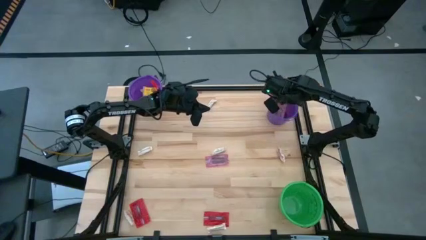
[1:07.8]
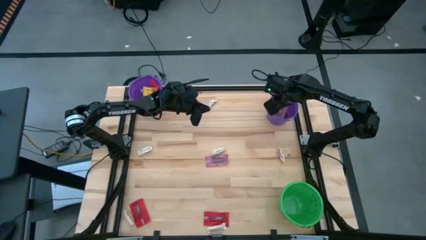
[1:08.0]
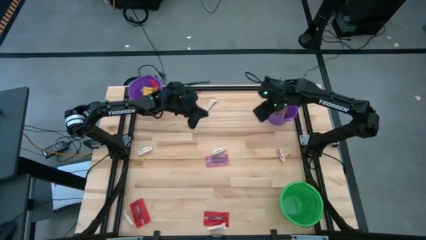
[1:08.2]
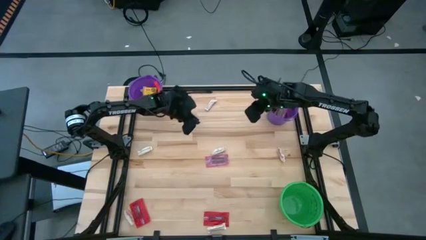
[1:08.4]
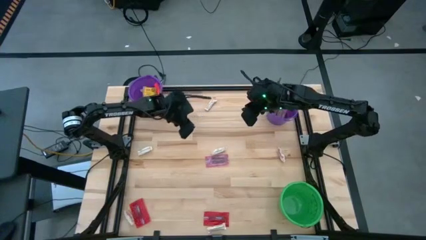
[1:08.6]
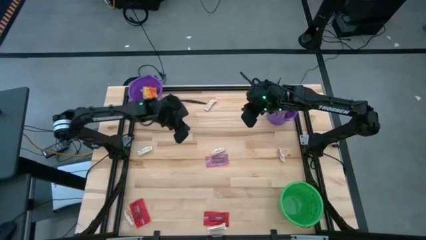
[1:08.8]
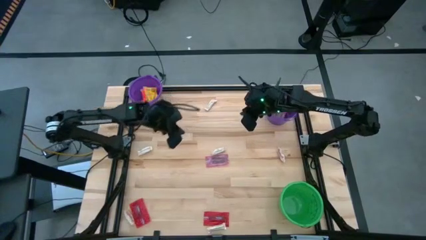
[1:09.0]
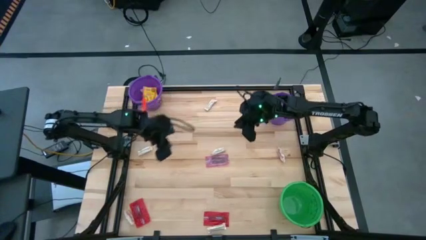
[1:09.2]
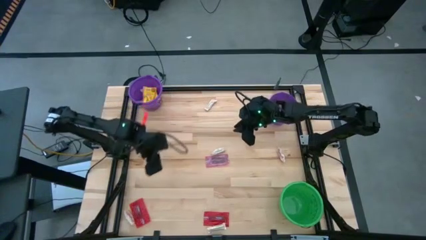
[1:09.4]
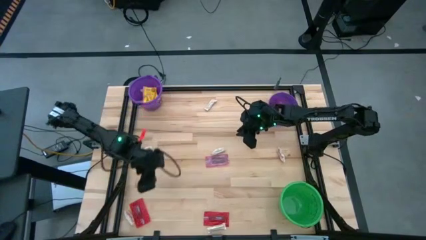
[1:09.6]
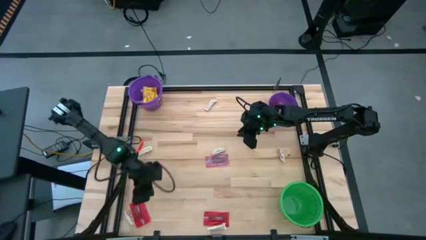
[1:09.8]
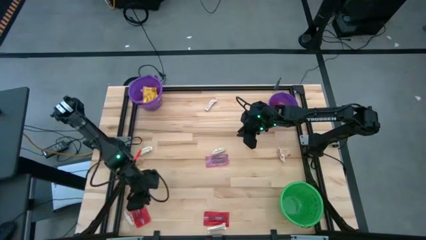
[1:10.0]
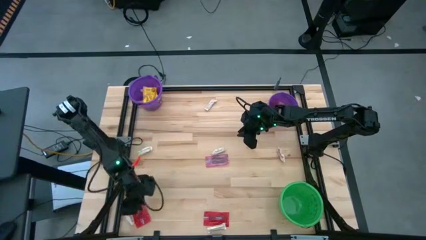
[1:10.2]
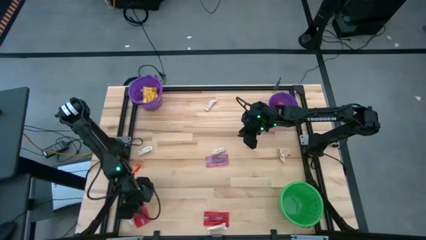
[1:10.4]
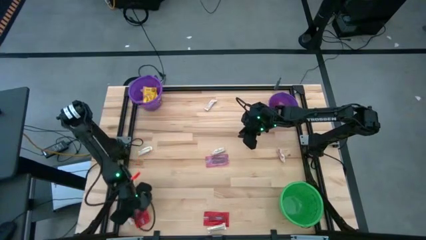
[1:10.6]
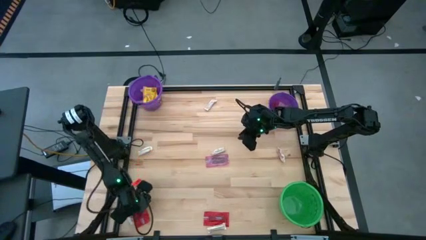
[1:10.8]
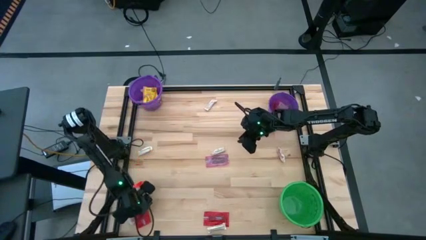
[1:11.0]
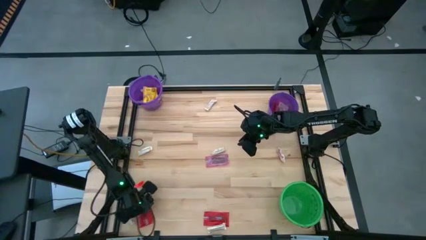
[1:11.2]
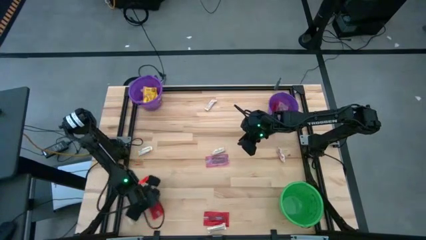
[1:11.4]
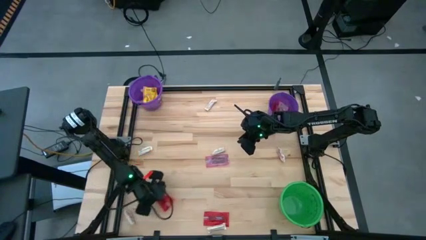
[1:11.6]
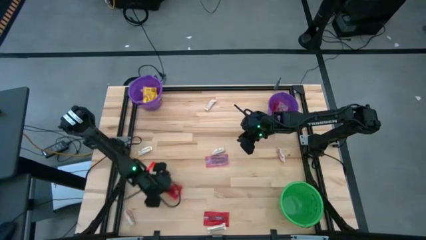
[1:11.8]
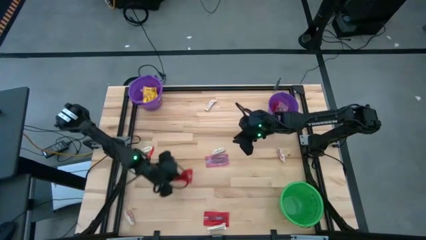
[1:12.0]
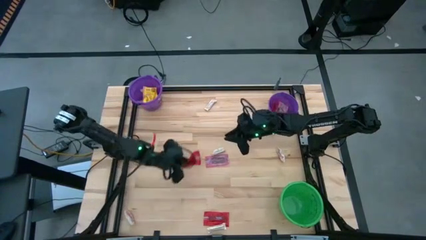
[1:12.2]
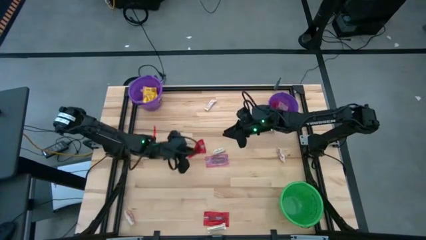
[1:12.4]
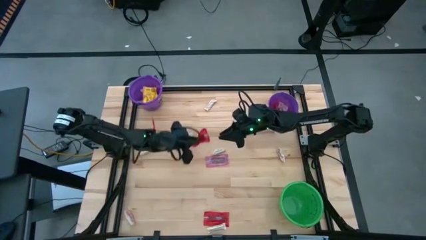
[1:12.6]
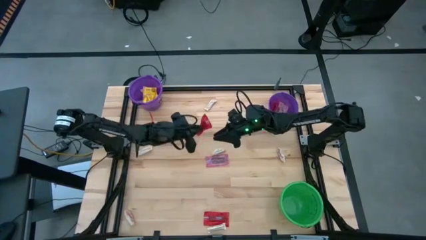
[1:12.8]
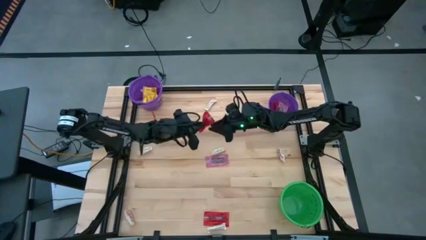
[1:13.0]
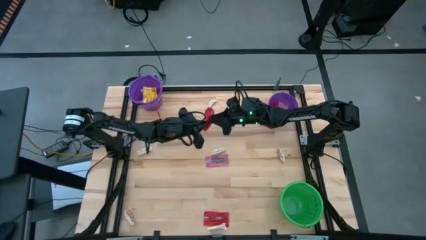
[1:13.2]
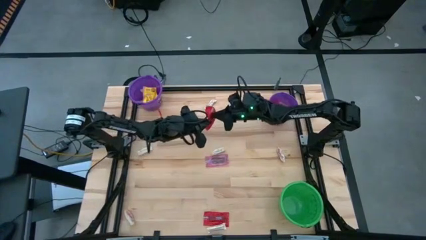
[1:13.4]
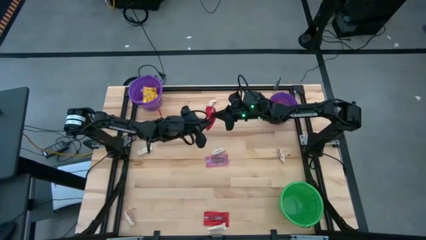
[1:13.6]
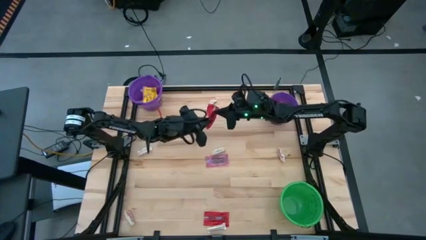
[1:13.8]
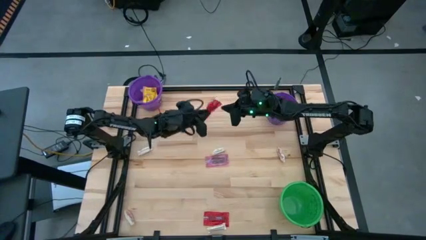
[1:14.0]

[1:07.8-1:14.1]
Task: Sort candy by brand, put in halloween buckets
Put the red candy into the right purple bucket

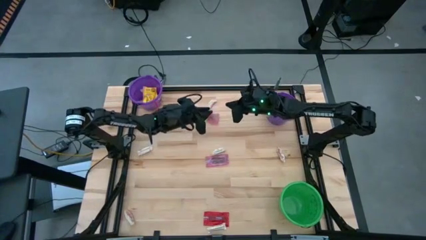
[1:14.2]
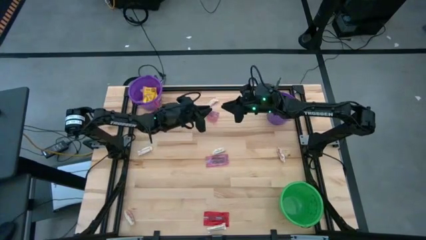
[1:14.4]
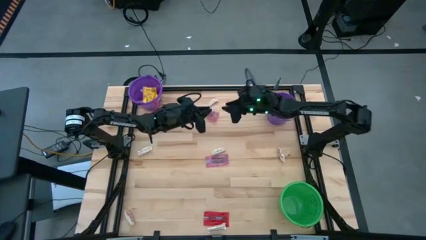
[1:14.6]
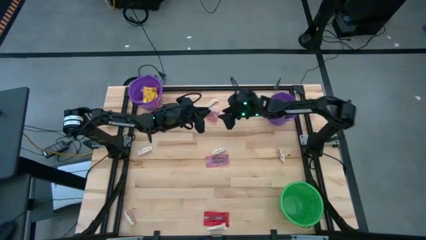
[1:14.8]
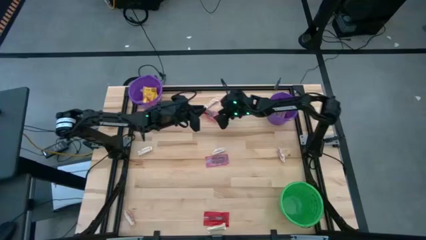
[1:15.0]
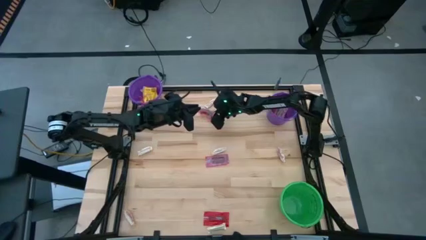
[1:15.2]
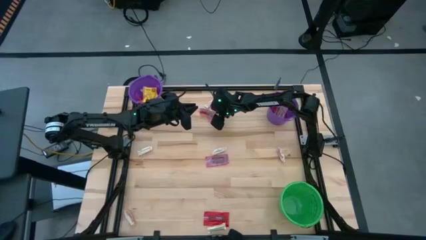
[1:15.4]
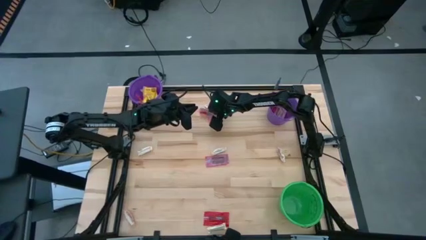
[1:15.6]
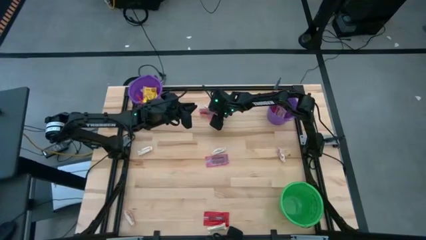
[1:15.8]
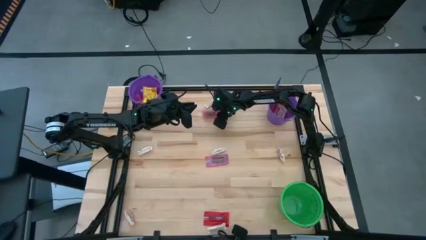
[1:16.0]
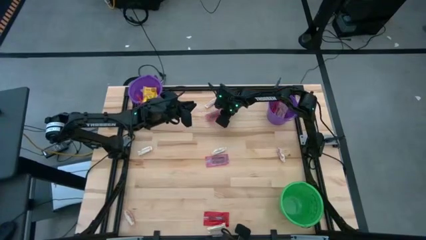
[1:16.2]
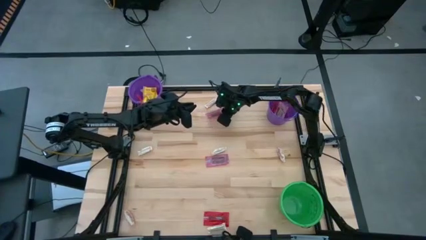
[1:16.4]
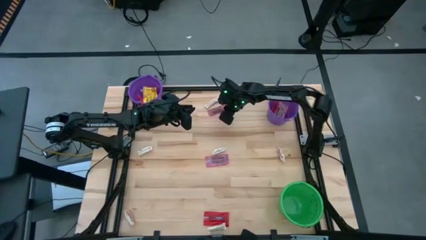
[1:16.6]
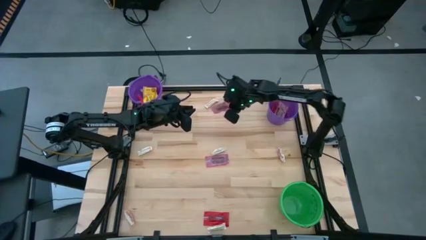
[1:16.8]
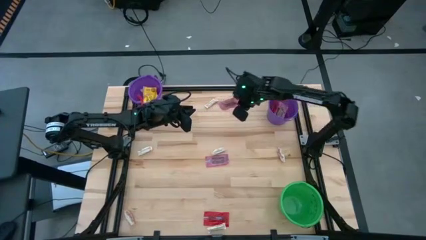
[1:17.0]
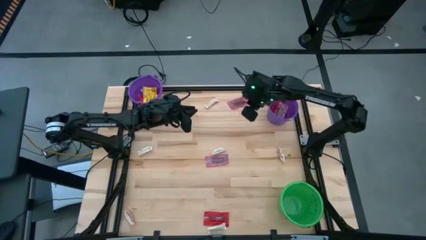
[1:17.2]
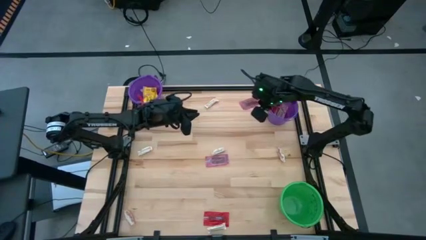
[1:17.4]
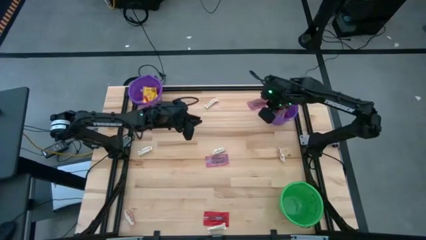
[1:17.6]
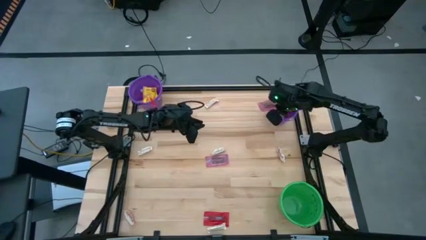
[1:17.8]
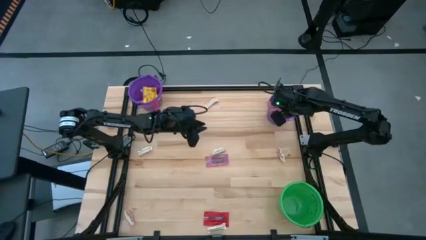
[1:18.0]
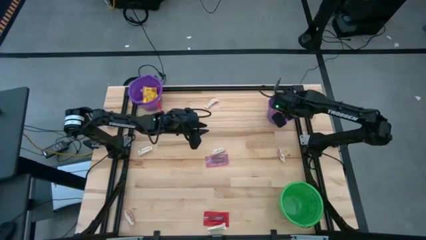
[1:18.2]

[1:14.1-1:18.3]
Put the red candy into the right purple bucket

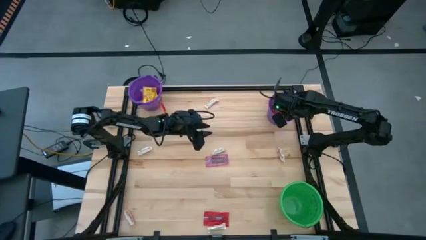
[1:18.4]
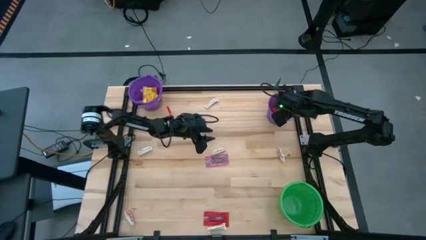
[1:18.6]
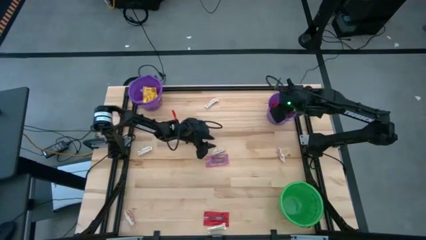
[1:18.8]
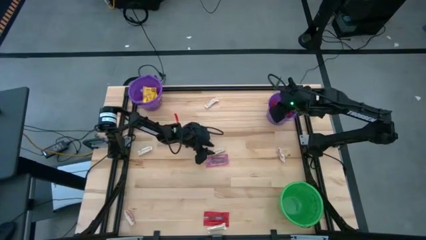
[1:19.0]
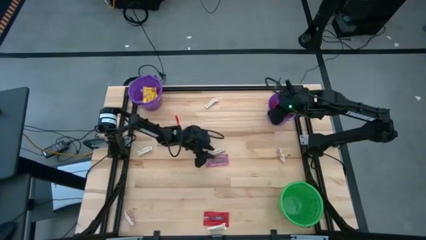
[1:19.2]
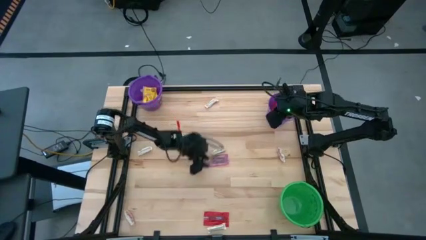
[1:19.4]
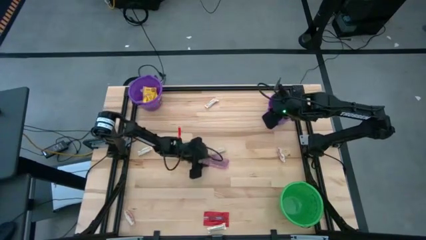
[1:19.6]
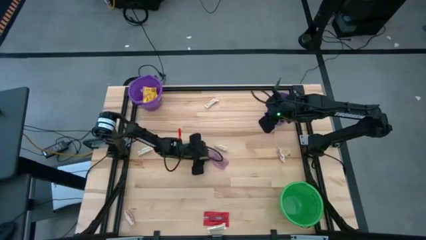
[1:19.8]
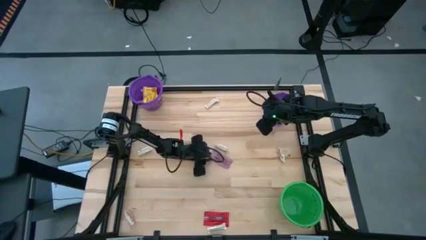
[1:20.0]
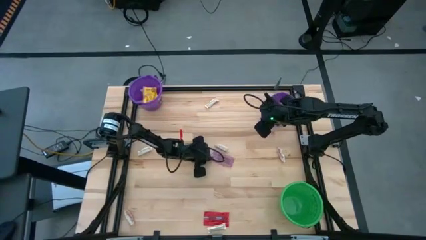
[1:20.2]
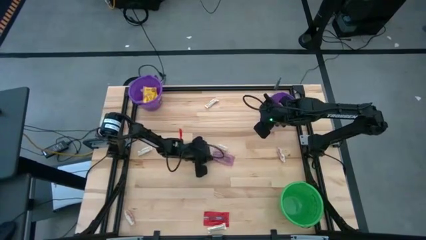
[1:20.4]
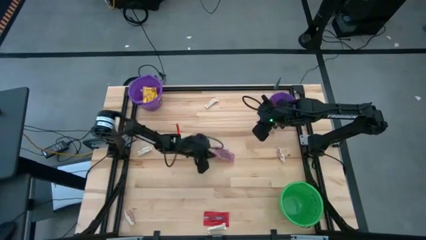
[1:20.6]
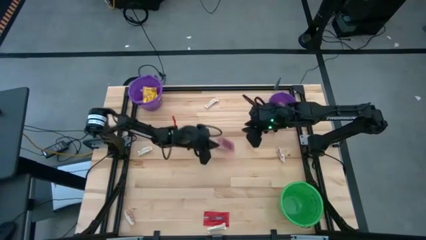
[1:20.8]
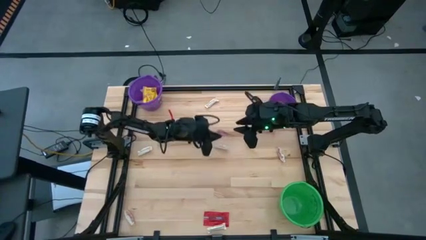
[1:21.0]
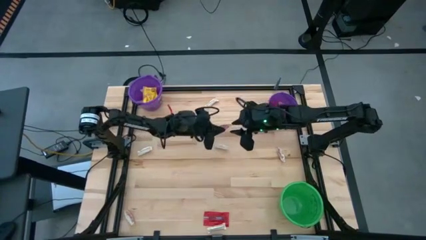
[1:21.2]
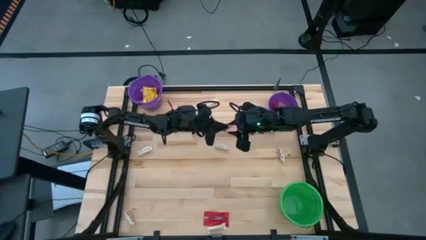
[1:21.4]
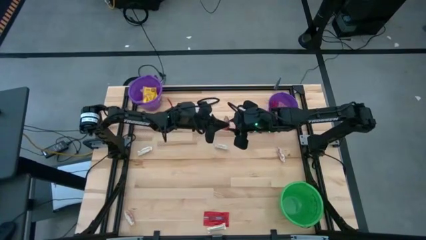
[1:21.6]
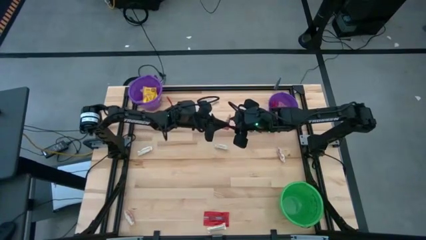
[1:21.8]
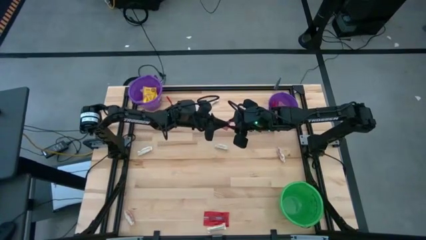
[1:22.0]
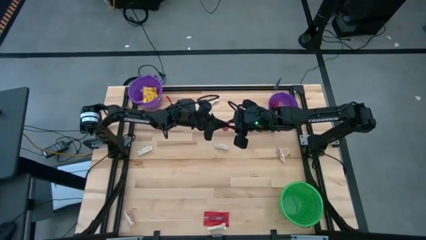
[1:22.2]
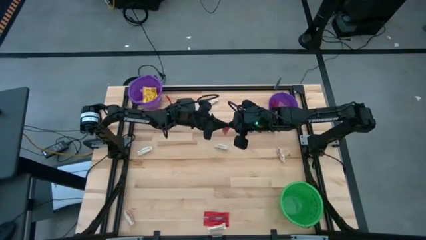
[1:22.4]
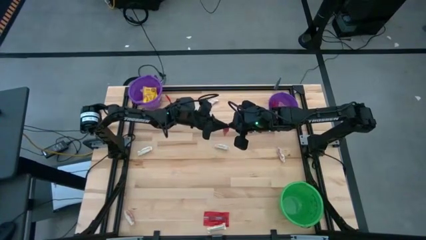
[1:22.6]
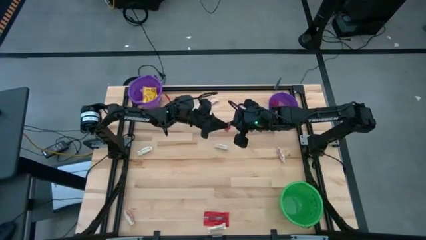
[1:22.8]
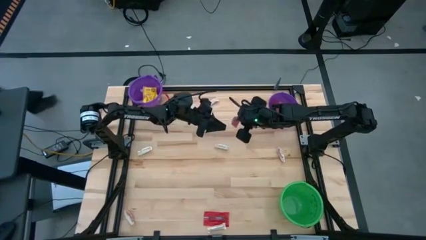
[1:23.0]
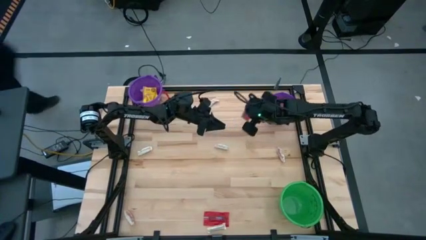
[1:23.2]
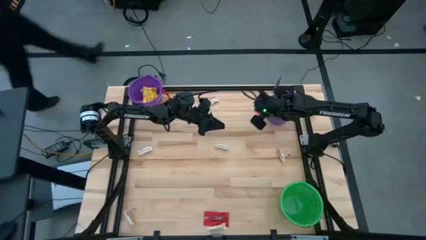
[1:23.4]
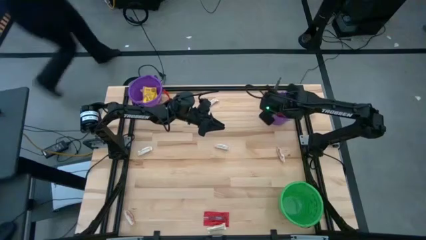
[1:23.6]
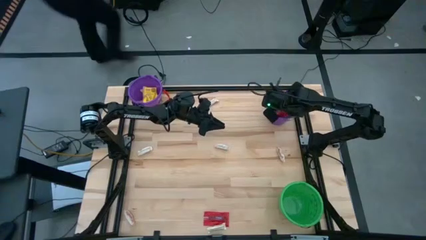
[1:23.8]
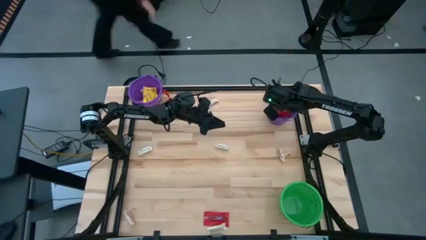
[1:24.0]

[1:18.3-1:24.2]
Put the red candy into the right purple bucket
